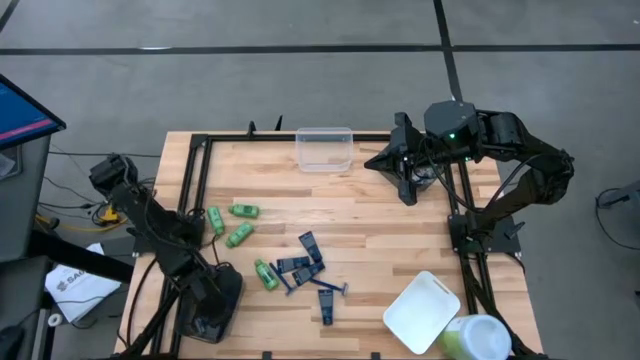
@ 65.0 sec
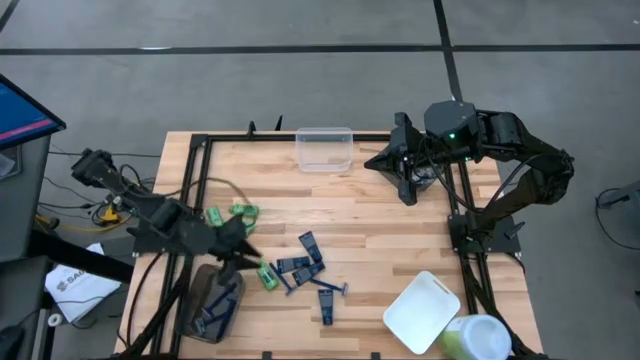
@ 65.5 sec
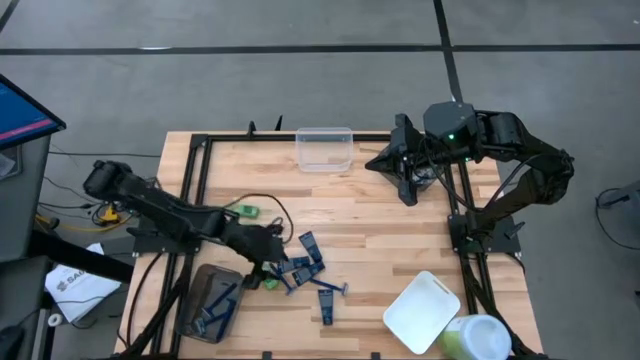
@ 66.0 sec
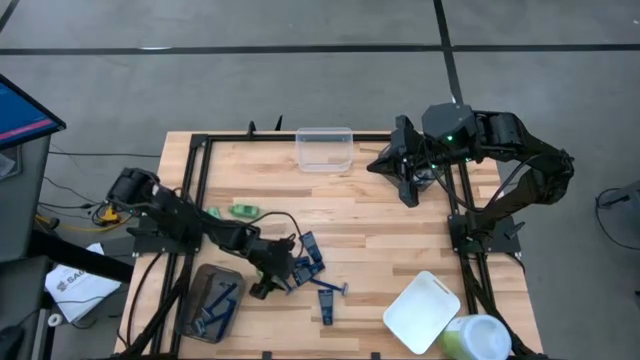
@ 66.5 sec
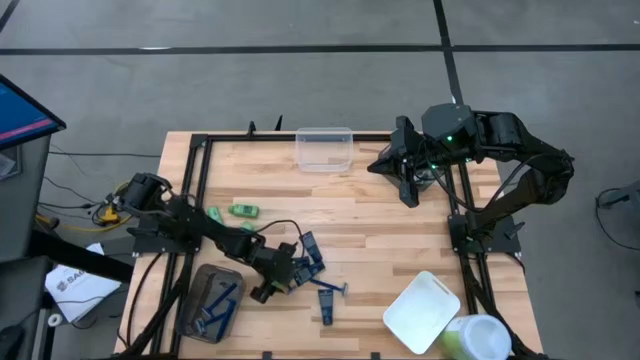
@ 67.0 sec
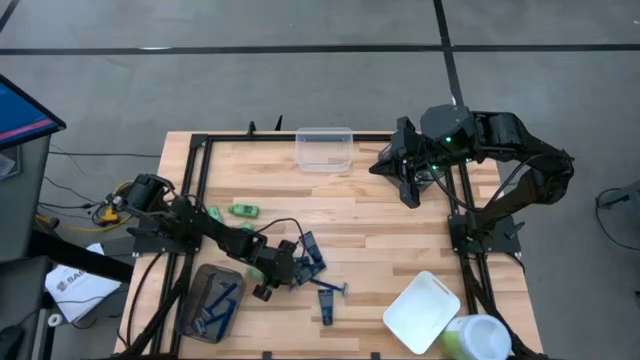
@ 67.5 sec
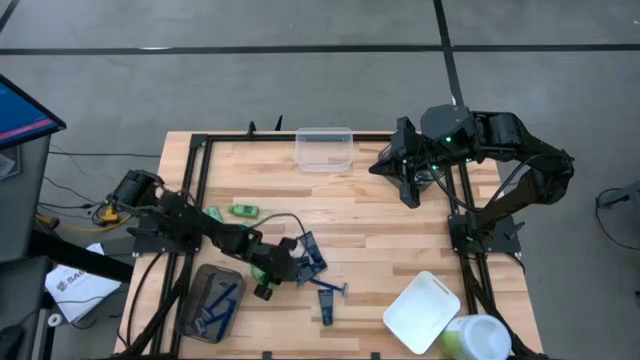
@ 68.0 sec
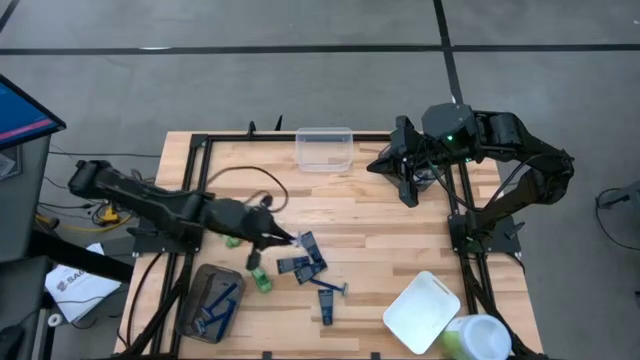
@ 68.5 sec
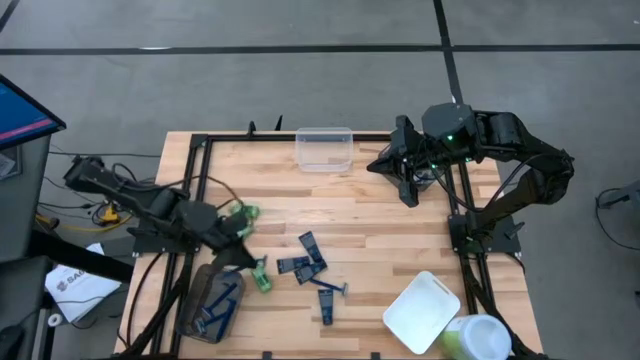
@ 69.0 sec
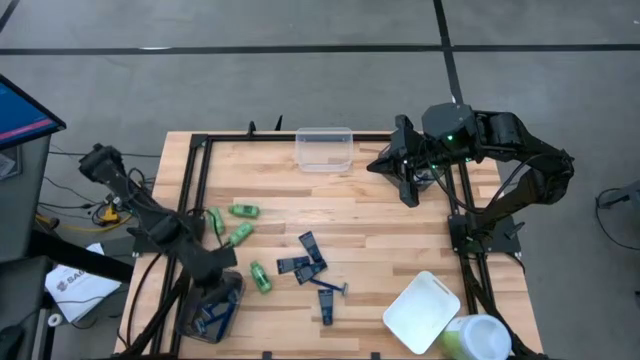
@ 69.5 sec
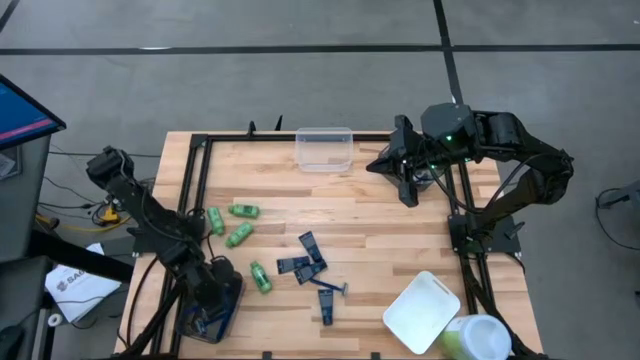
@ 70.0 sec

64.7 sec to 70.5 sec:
Task: Pick & Place Travel size toiletries
Put the blue razor into the bottom black bin

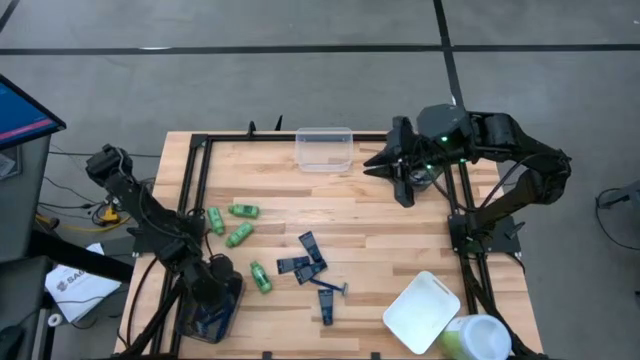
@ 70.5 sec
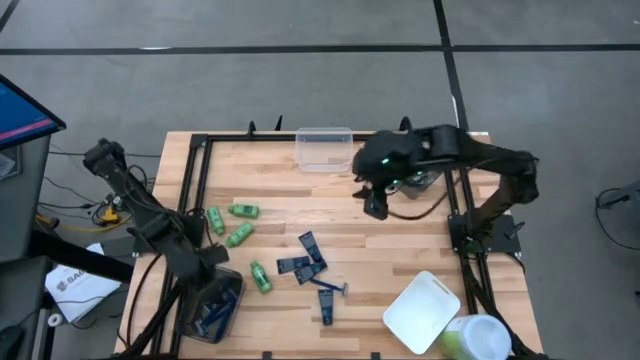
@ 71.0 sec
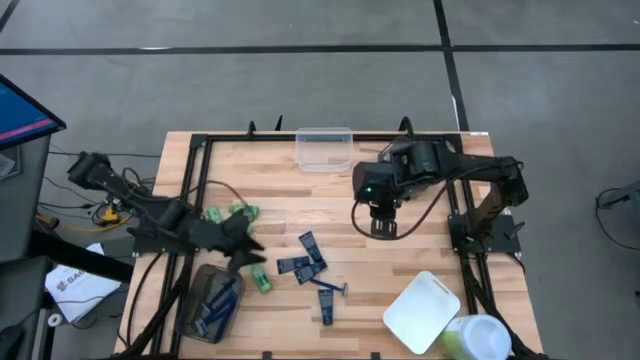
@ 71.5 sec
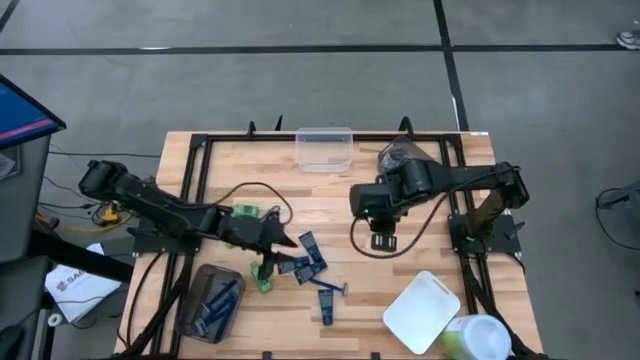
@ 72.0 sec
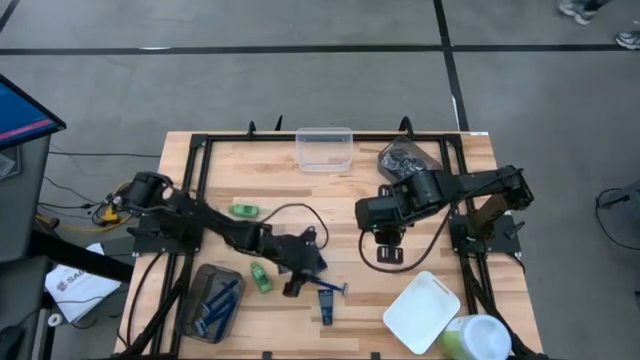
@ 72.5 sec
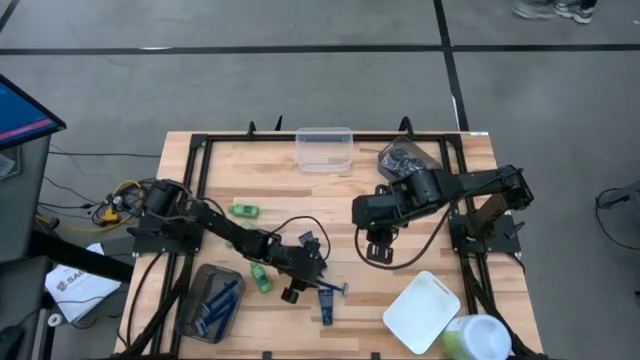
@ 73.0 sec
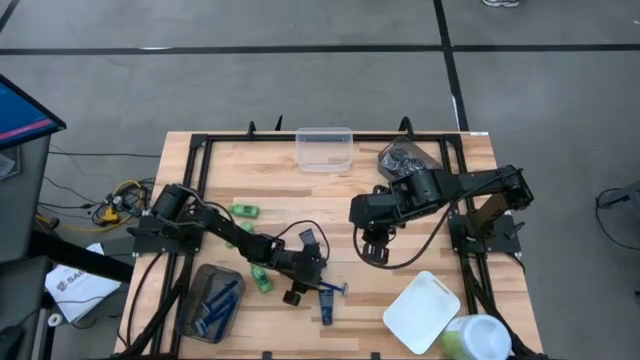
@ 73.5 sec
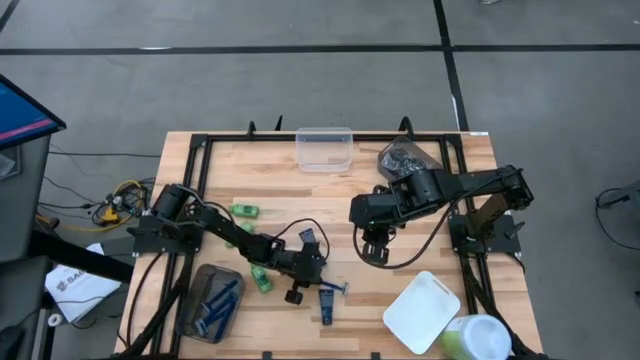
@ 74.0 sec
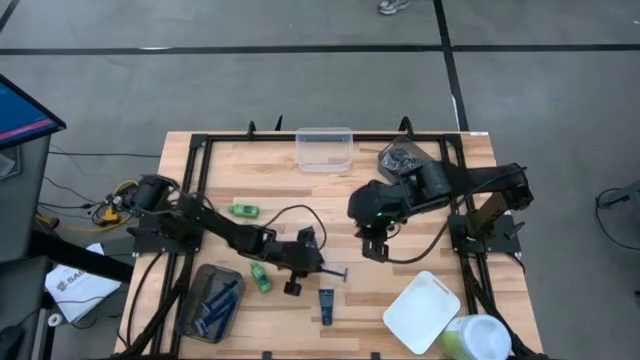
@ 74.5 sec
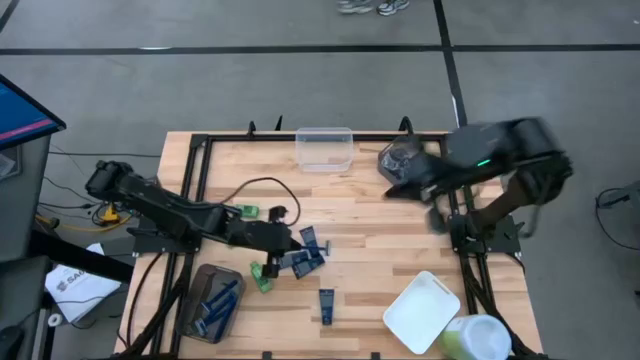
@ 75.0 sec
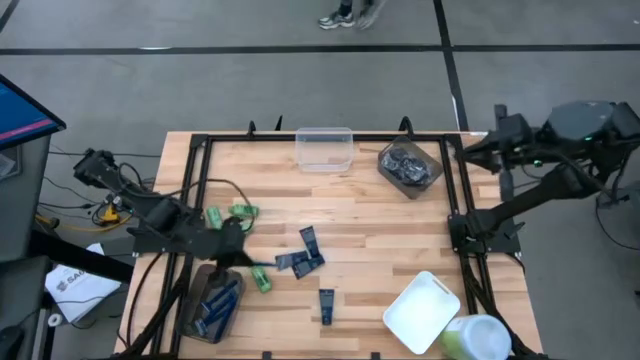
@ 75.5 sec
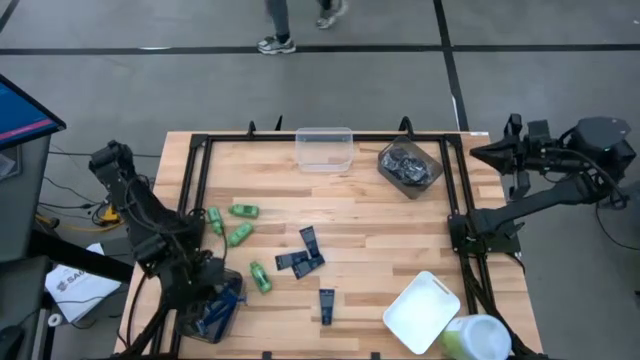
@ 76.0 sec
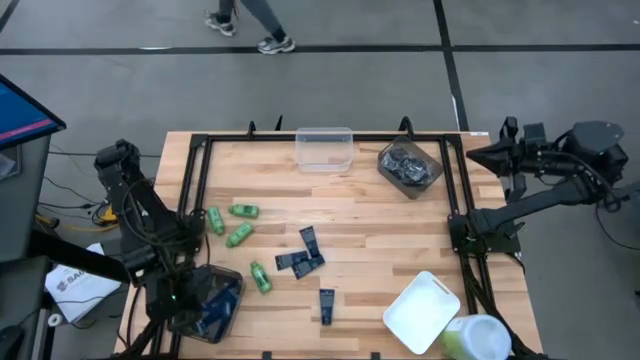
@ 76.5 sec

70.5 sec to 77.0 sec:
Put the blue razor into the bottom black bin

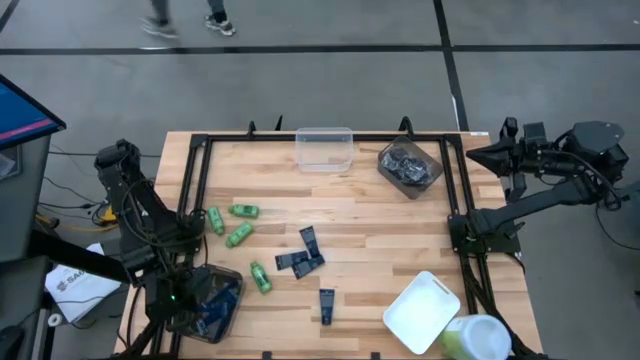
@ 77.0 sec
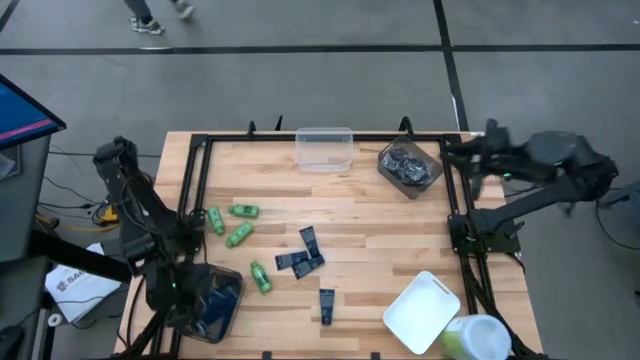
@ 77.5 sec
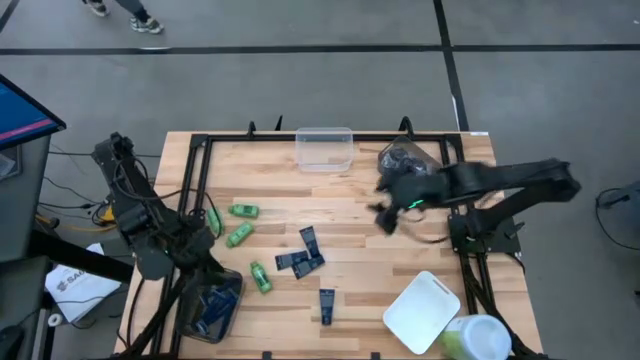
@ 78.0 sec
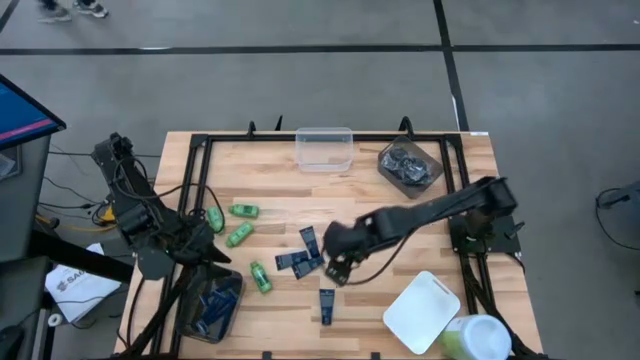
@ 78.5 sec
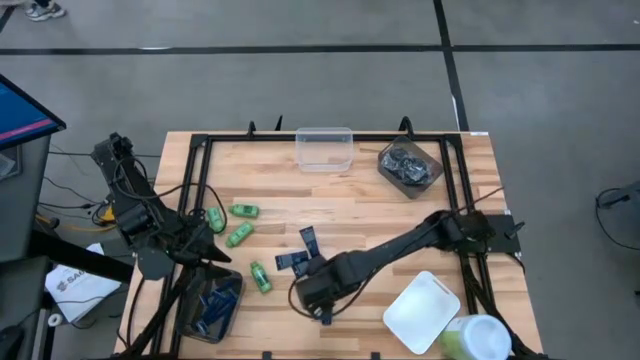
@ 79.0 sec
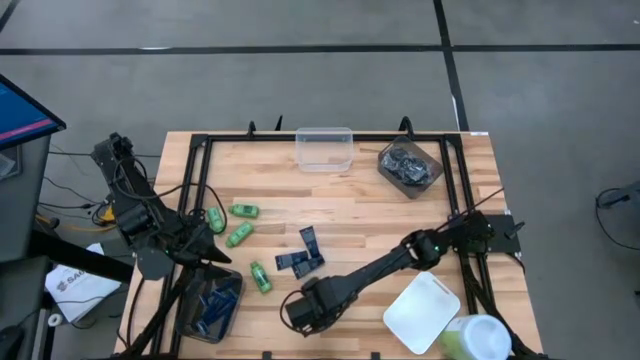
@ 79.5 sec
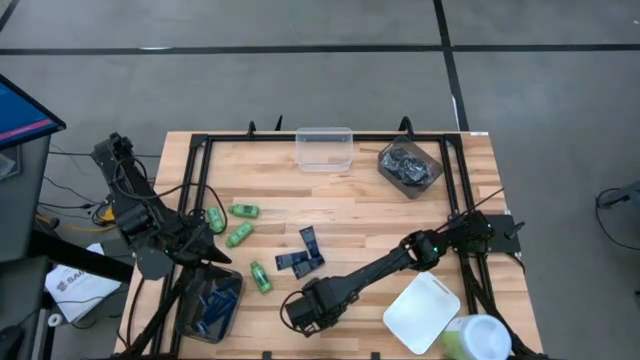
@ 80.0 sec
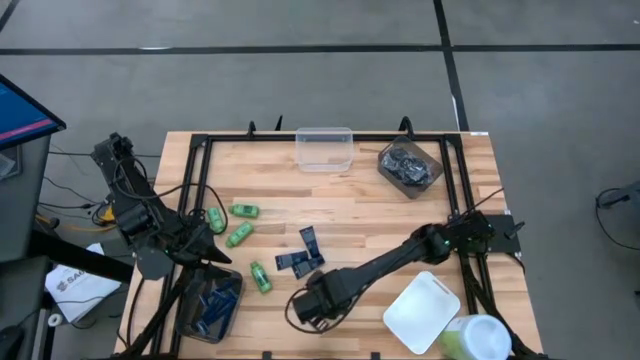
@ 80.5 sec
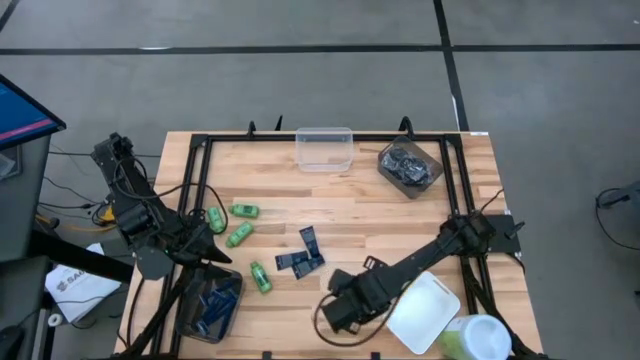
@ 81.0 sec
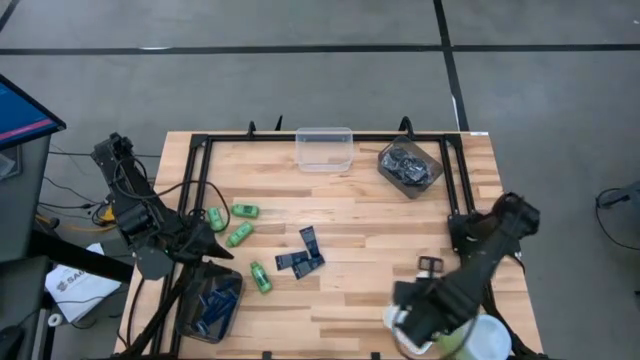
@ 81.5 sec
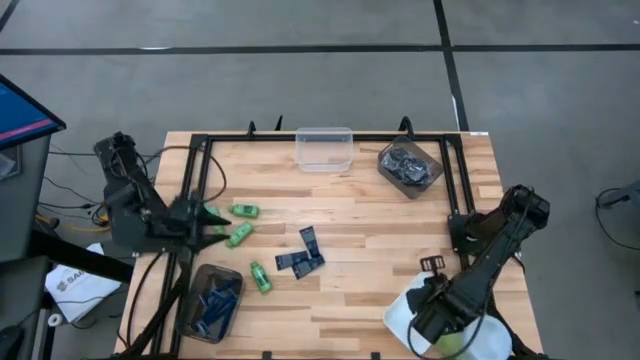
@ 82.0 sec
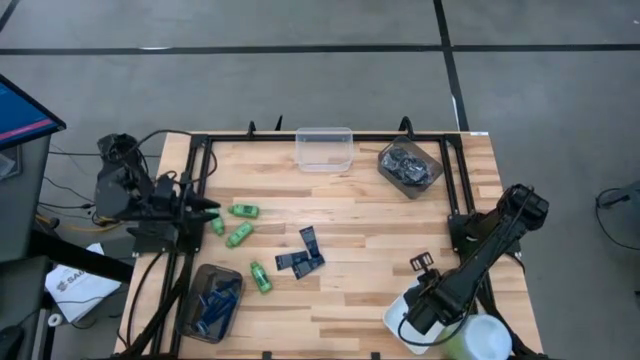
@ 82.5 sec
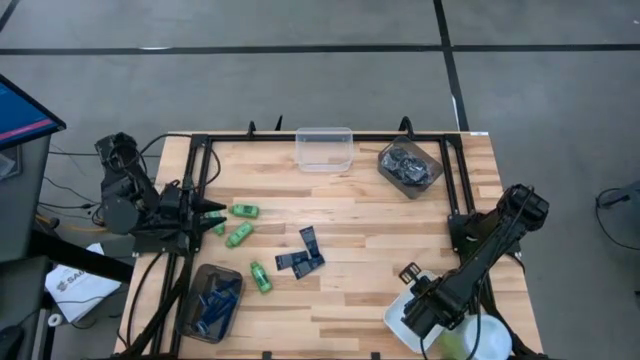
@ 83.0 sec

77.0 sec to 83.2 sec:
Put the blue shave cream into the white bin

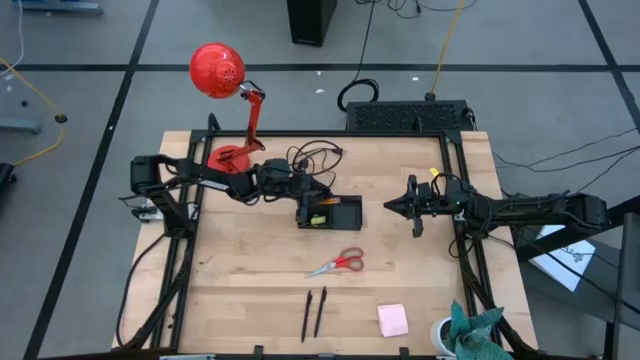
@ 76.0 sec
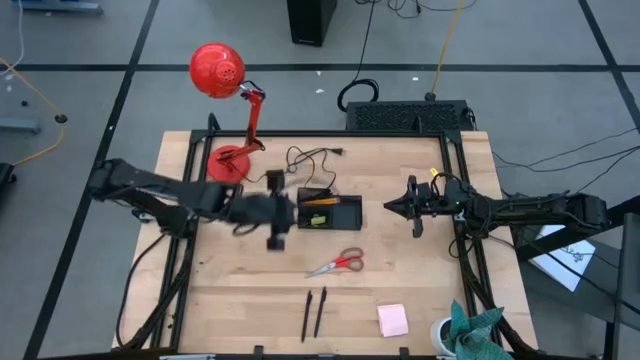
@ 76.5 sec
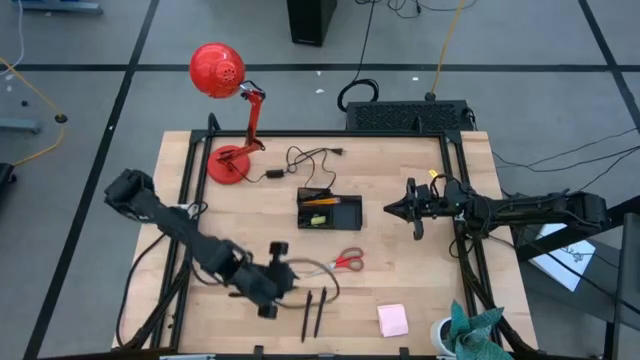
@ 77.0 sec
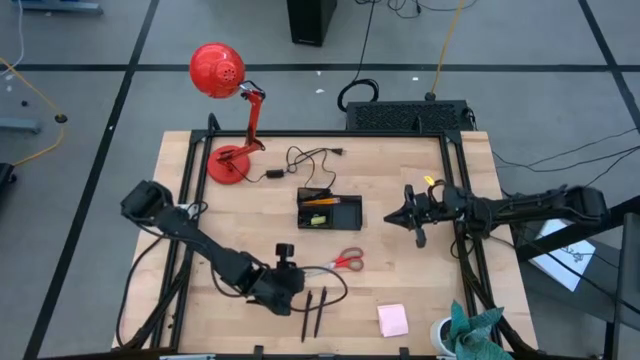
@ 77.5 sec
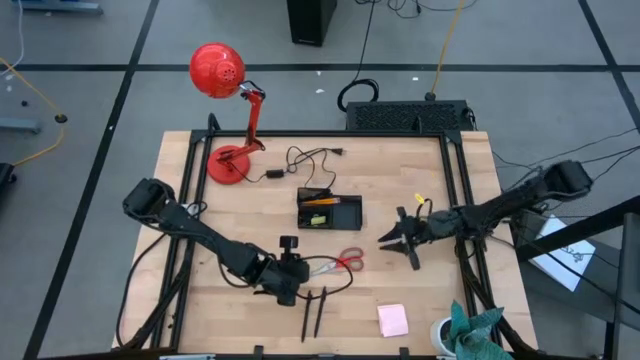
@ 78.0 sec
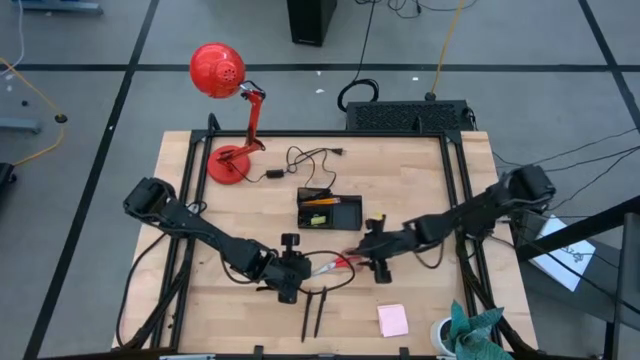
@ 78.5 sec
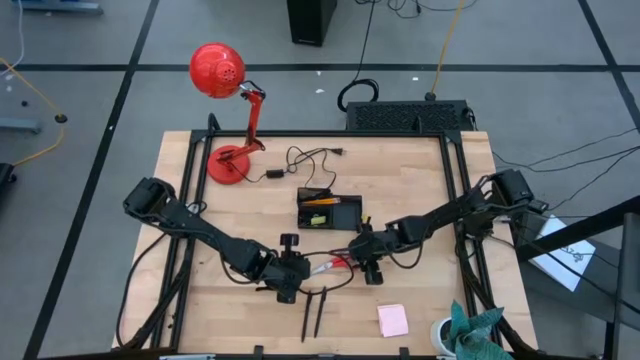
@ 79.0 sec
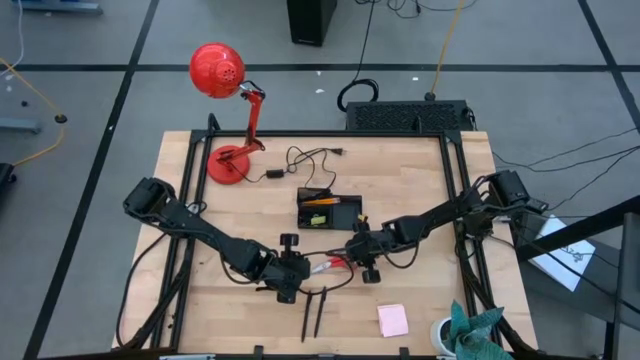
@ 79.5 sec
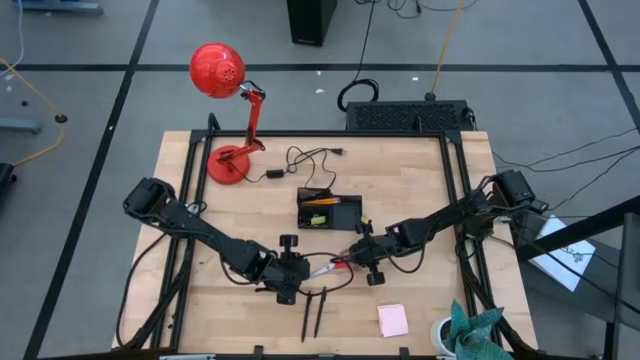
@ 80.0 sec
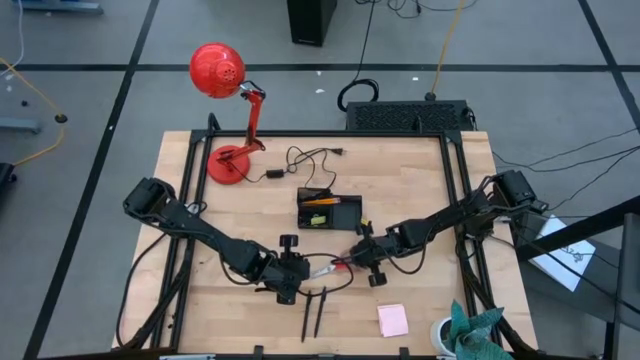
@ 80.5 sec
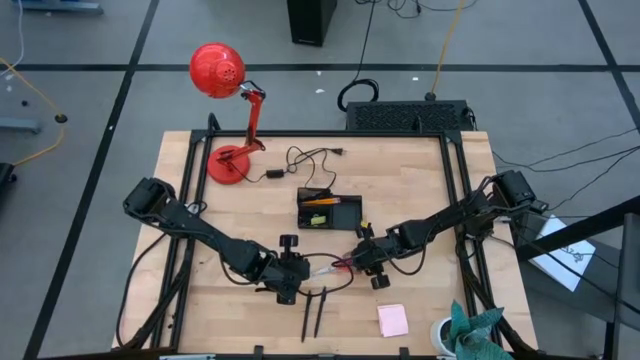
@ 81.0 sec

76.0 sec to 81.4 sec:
Task: Pick and place office supplies into organizer
Put the red scissor into the black desk organizer
